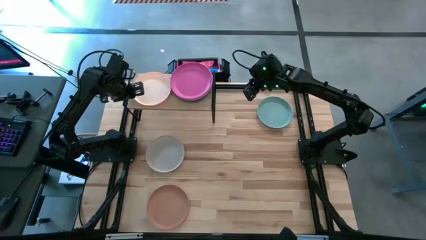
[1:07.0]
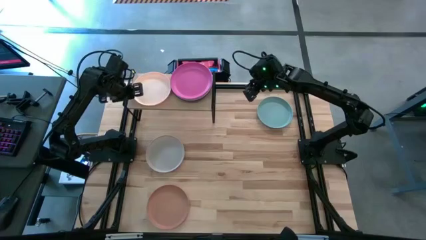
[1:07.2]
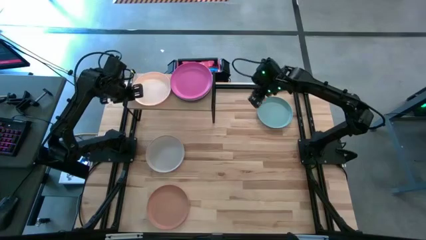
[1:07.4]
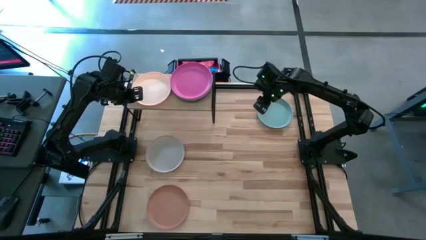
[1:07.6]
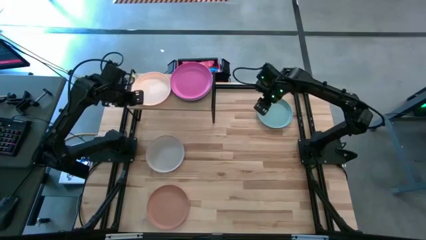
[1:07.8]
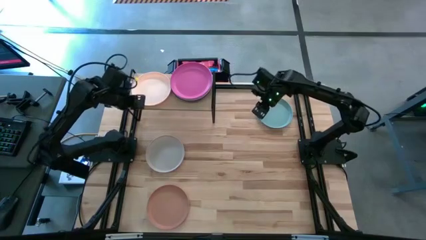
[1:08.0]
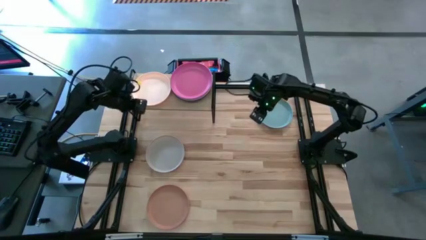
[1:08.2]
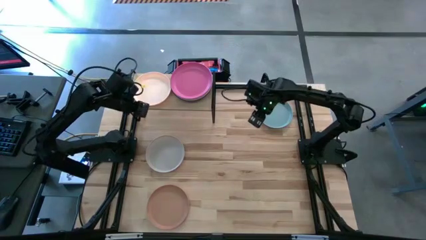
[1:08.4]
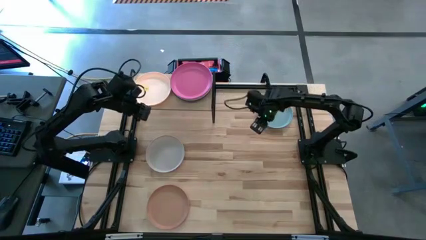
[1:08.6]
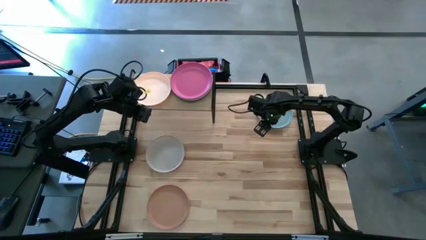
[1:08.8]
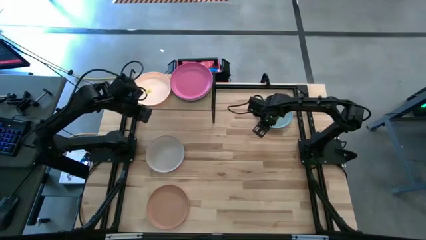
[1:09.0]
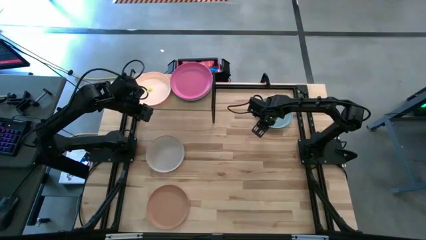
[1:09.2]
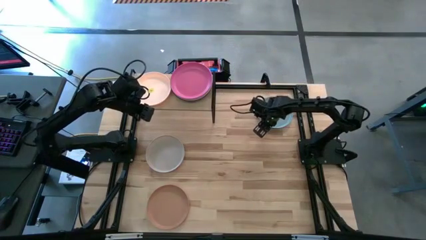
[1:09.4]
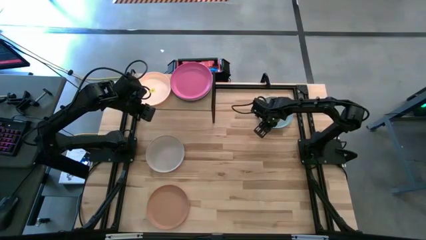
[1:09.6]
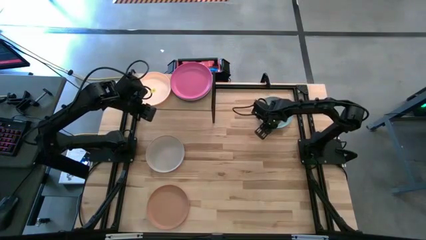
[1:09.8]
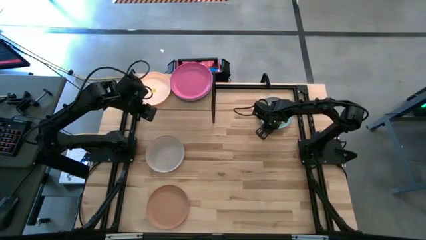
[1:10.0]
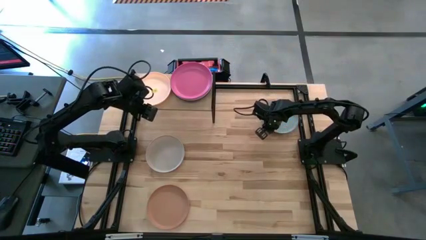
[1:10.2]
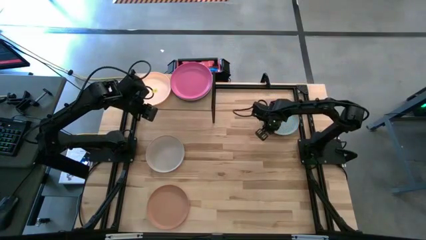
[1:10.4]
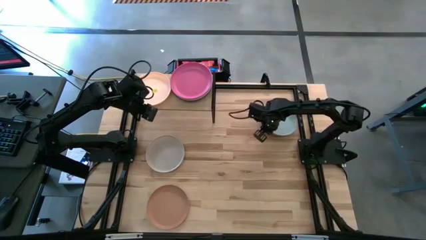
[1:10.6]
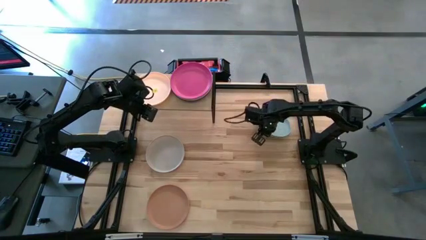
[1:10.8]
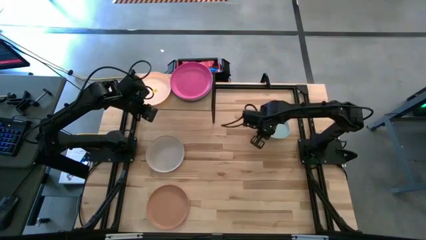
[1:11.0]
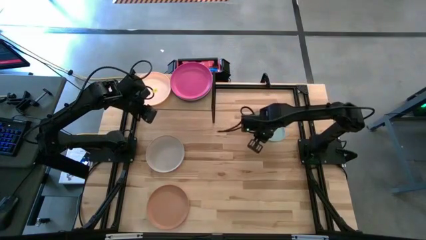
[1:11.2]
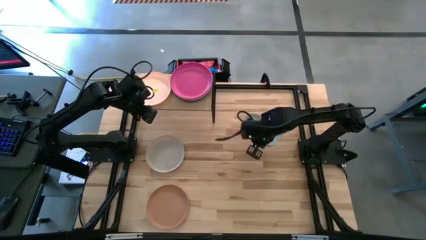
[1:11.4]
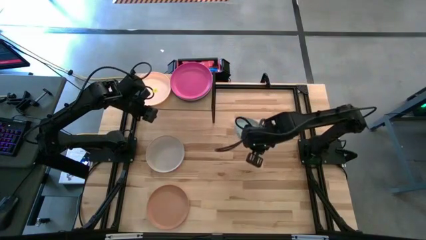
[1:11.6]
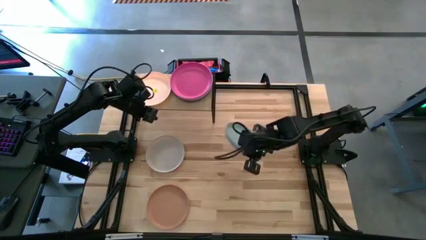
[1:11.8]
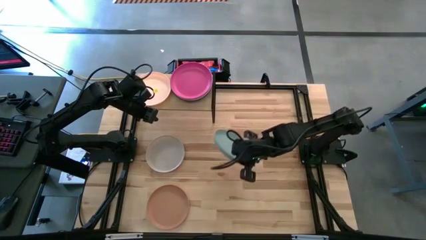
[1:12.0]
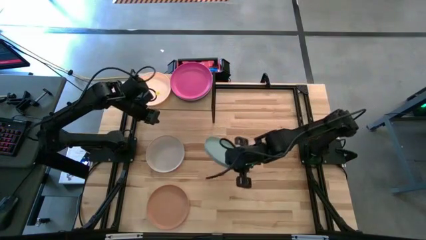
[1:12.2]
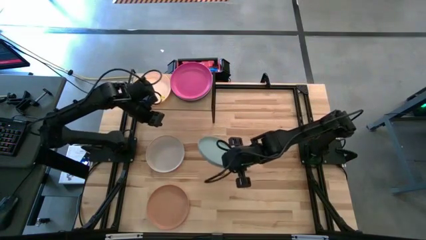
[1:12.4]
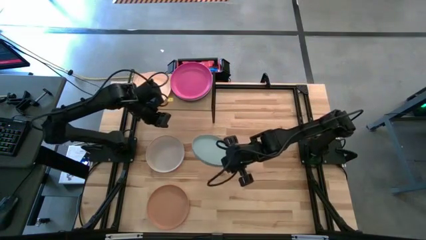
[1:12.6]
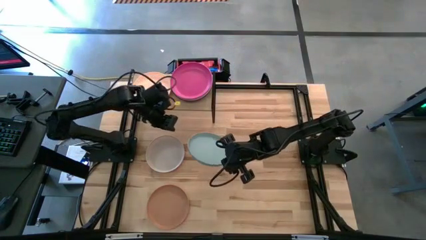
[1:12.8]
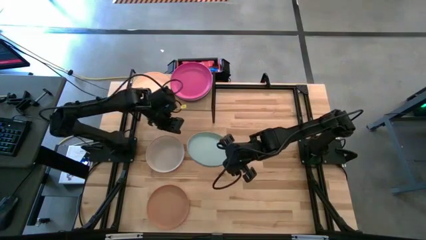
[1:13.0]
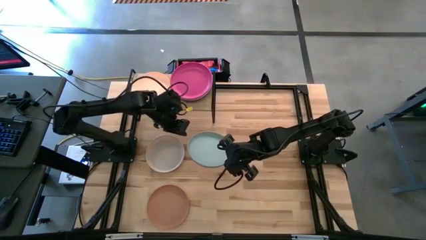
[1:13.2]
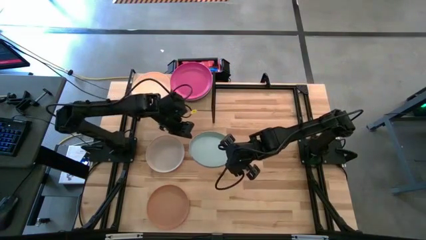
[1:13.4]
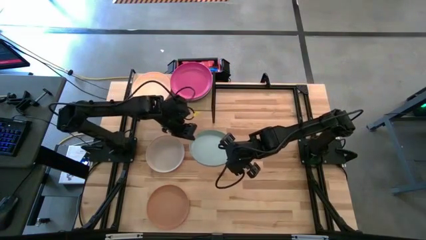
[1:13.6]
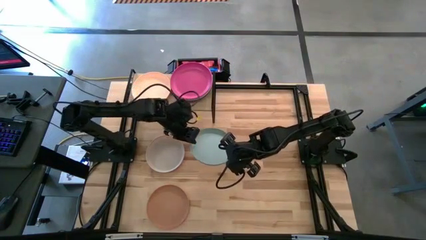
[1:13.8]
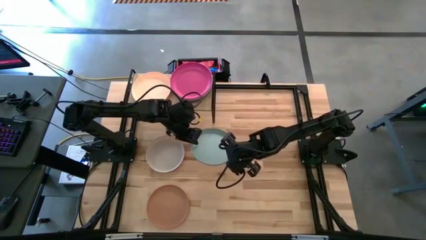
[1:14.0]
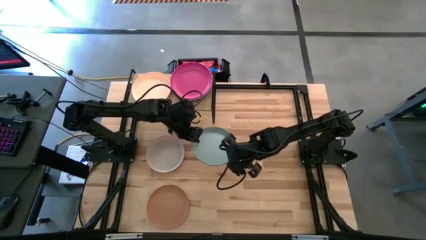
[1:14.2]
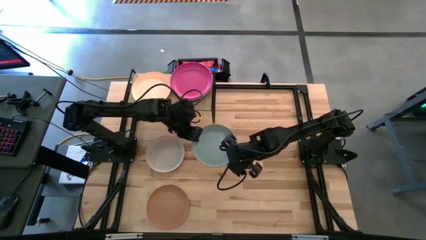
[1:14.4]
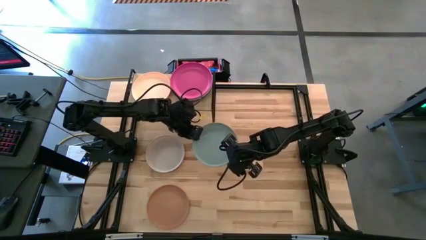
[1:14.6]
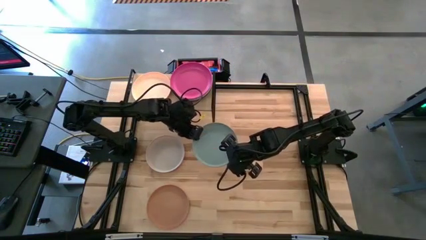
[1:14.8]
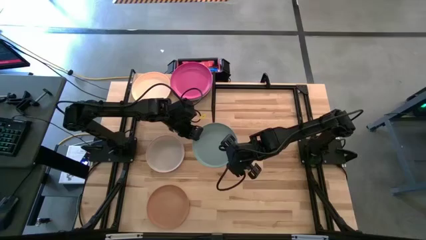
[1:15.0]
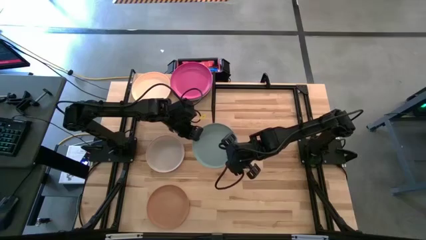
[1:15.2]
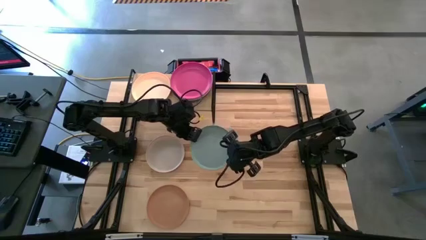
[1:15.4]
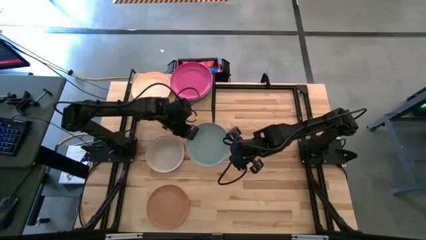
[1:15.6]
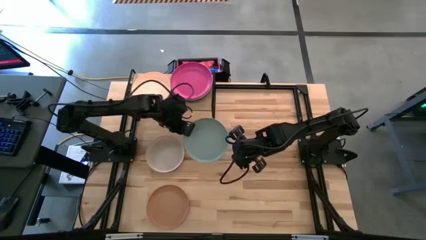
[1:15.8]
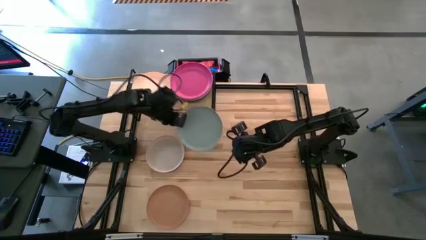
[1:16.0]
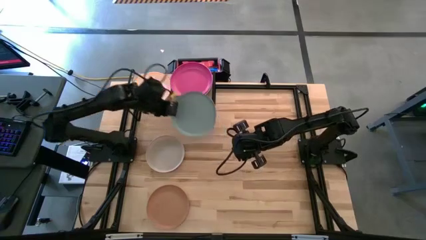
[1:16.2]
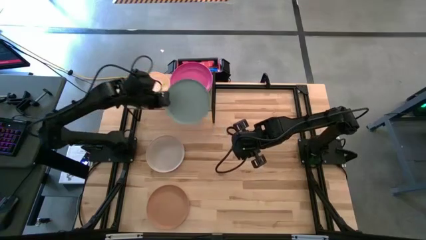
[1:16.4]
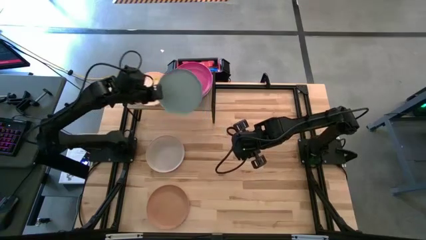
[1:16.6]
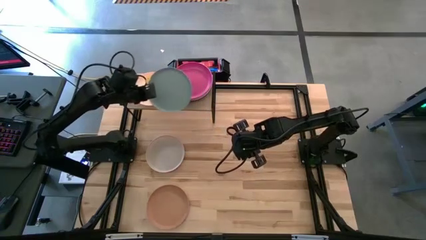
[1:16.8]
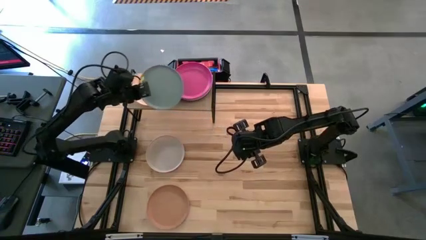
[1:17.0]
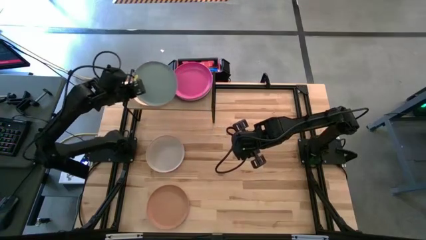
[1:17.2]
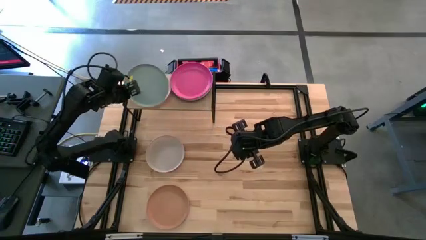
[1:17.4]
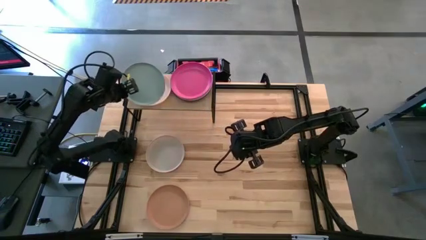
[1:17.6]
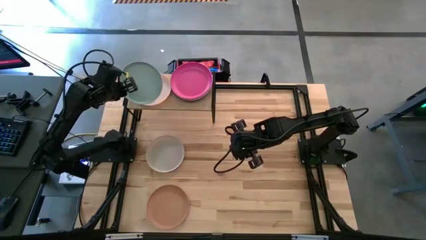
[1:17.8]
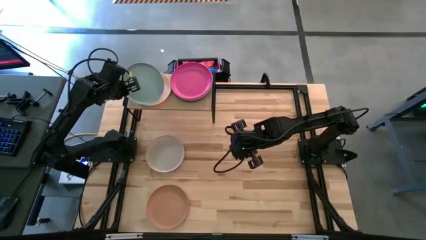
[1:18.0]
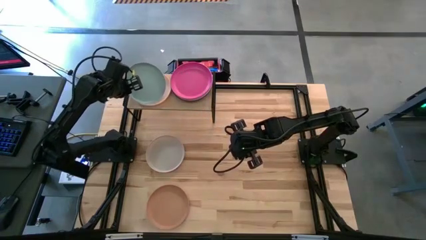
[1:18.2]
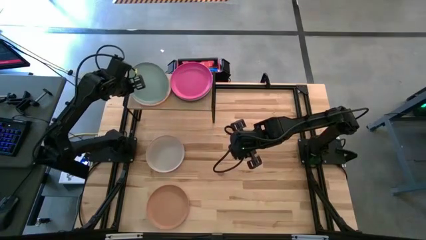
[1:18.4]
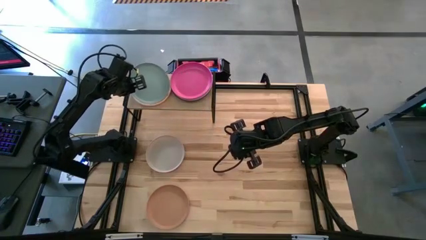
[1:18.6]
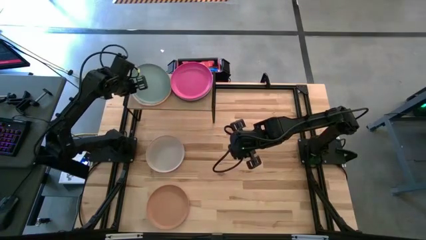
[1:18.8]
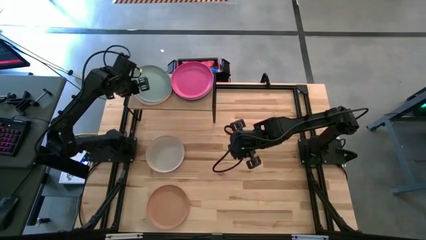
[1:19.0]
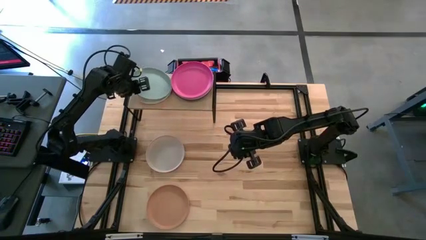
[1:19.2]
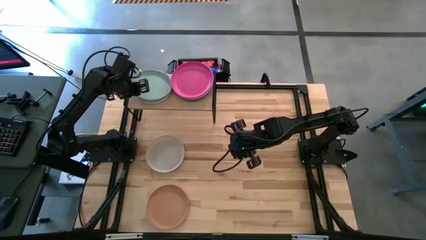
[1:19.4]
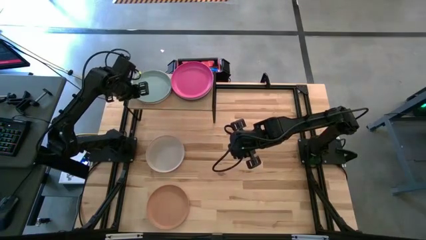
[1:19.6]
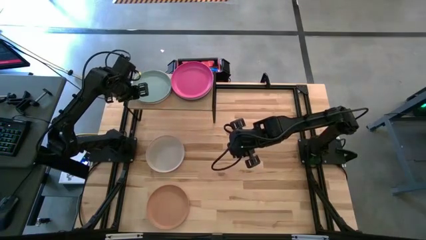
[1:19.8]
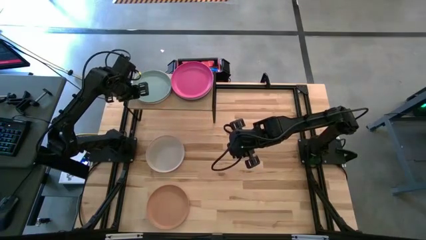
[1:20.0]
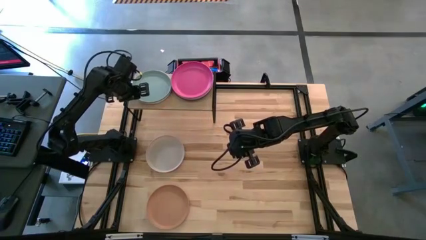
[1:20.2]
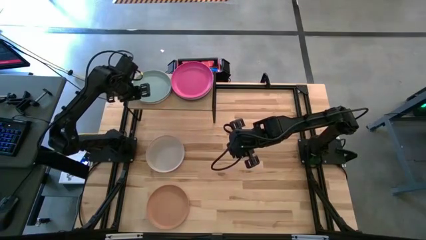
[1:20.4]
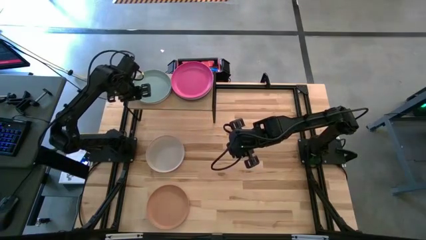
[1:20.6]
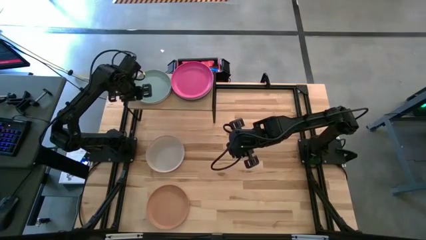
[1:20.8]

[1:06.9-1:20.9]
Task: Place and stack plates onto a shelf
Stack the light blue plate on the light pink plate on the shelf
